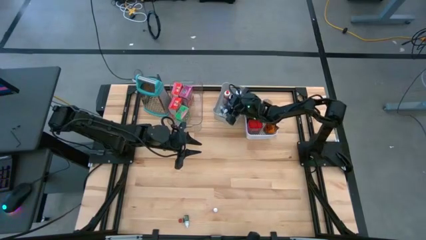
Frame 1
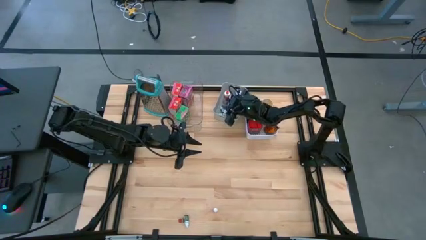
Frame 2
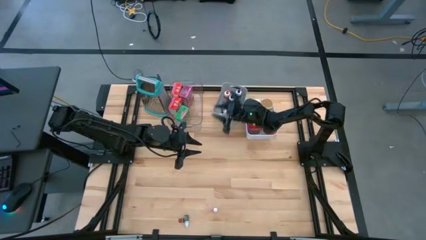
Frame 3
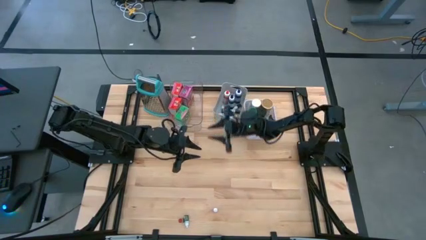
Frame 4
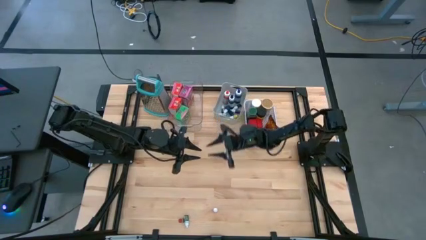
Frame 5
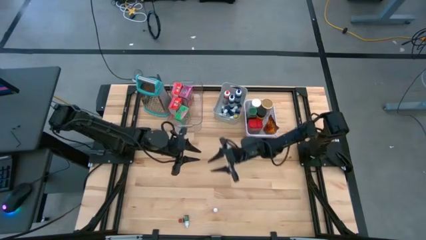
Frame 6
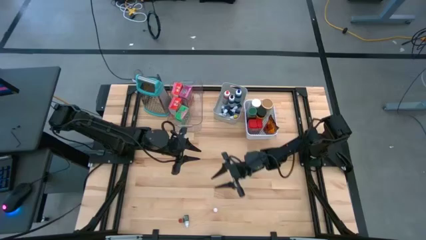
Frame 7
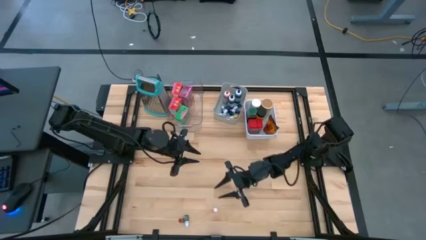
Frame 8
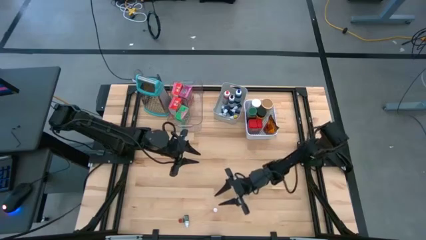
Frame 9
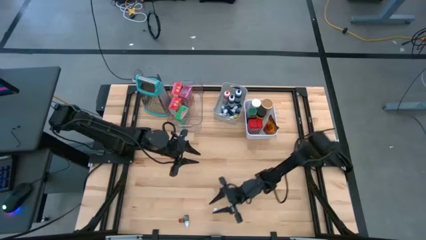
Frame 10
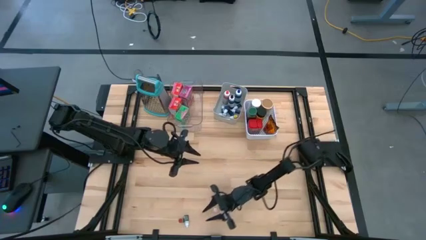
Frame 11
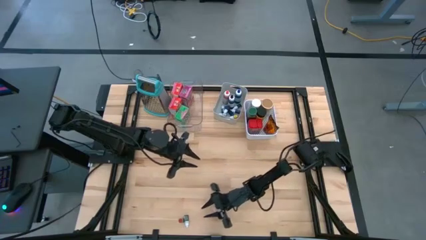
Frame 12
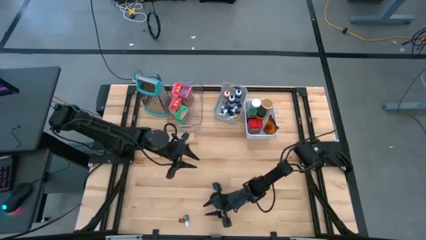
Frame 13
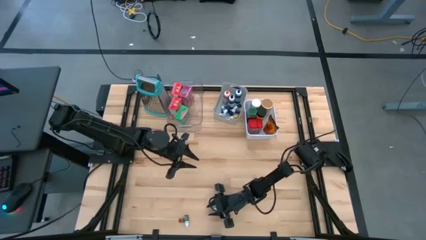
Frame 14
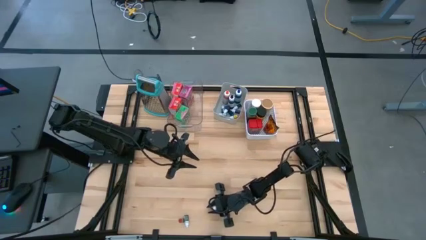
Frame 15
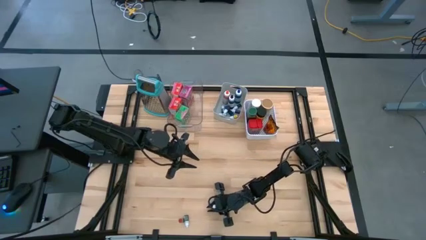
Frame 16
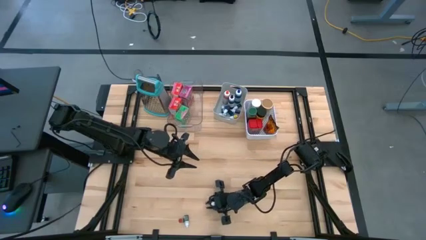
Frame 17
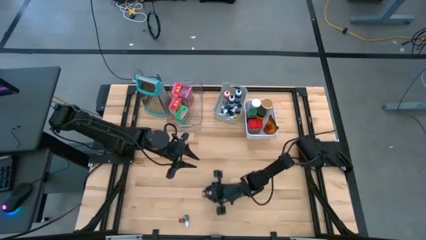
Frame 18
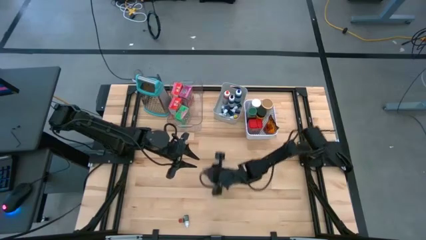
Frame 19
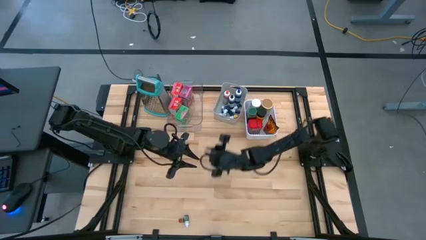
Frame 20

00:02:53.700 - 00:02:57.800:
Task: Pick & Place Kitchen Items
Put the small orange food coloring bottle into the gray bin

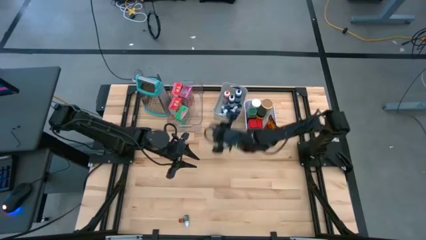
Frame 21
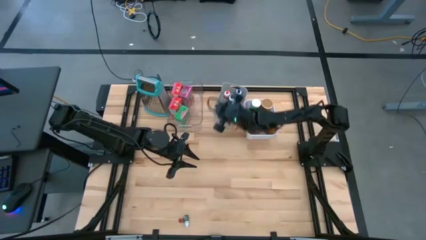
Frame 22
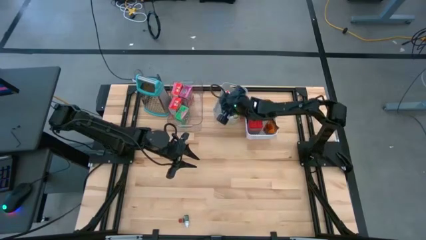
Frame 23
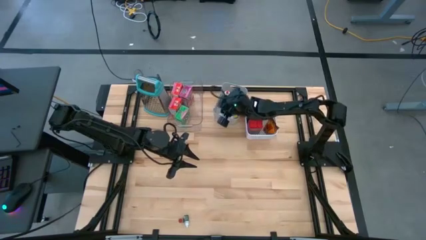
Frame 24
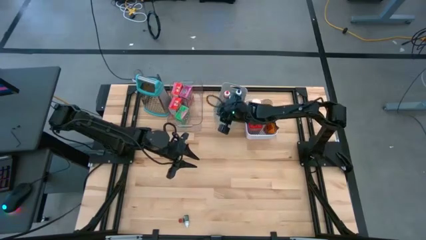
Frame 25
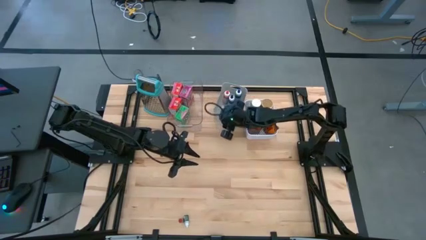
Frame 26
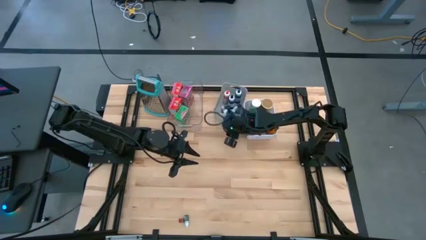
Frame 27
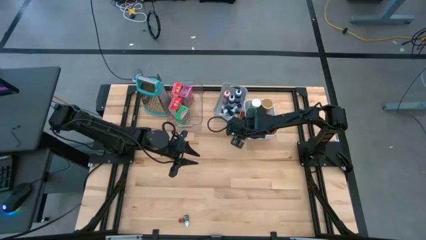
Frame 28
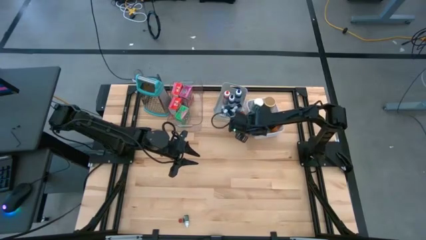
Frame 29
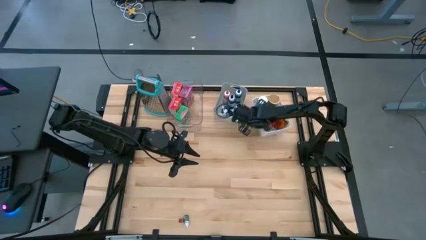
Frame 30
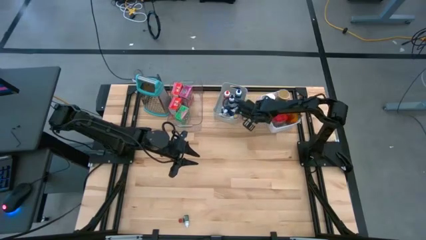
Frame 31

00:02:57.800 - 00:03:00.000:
Adjust the white bin

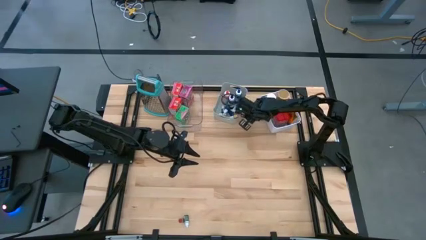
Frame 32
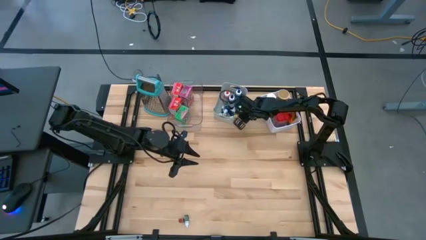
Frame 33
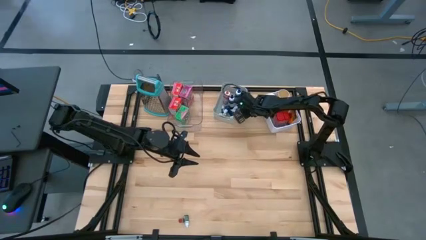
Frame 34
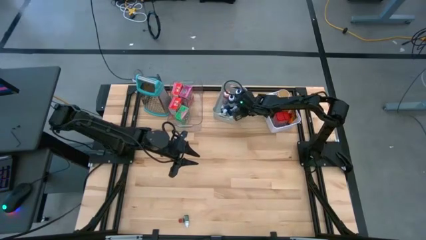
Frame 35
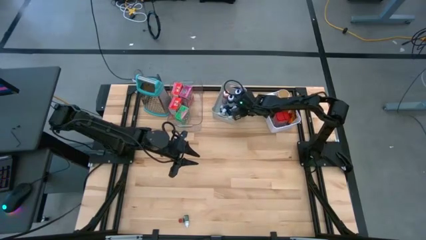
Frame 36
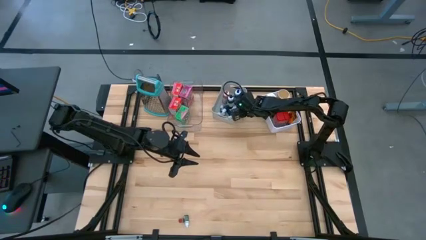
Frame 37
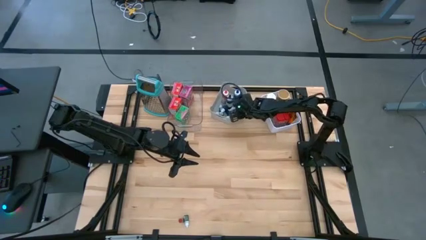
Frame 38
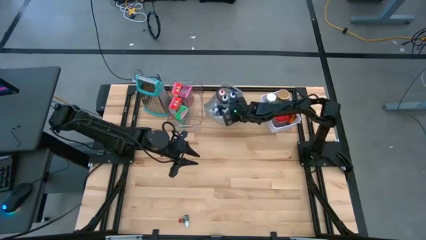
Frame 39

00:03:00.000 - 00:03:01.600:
Adjust the gray bin

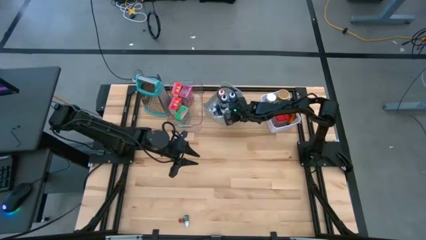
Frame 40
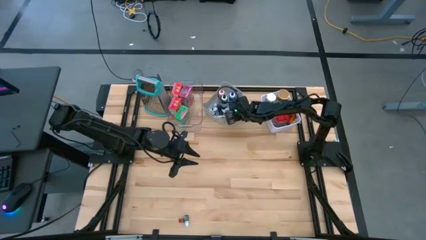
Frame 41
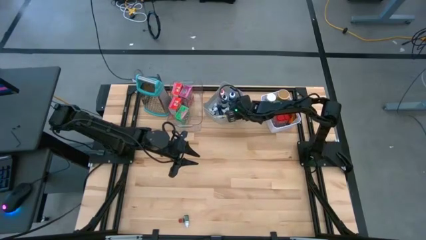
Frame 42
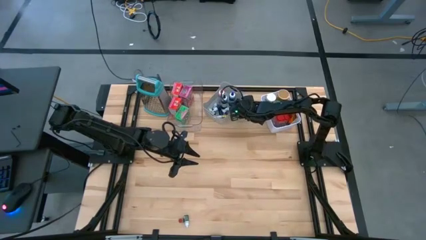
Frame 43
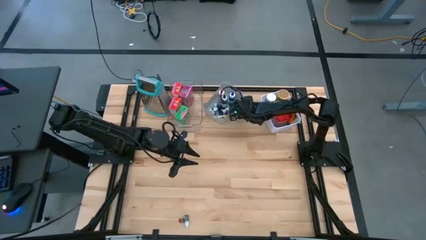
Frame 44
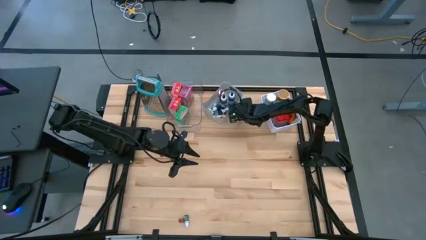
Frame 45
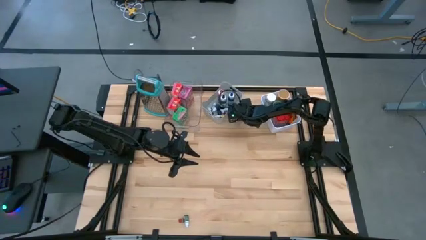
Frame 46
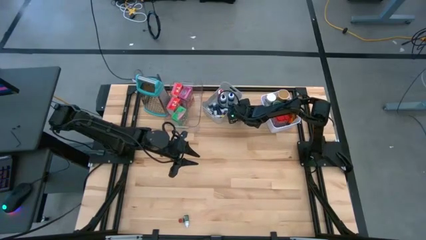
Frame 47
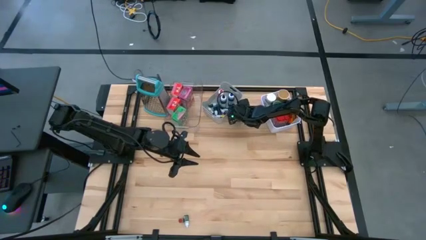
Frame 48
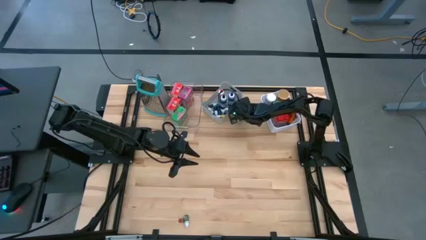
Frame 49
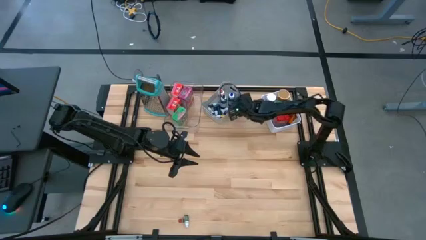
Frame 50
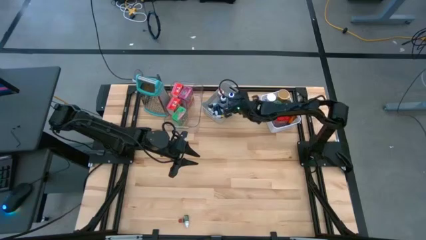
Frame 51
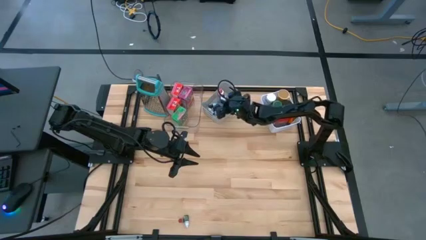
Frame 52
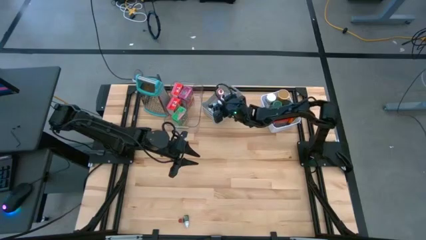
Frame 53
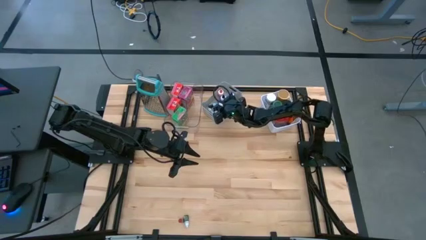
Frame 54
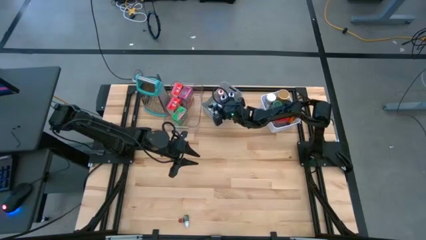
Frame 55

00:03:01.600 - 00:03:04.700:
Put the small orange food coloring bottle into the gray bin

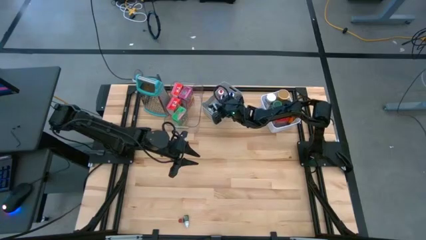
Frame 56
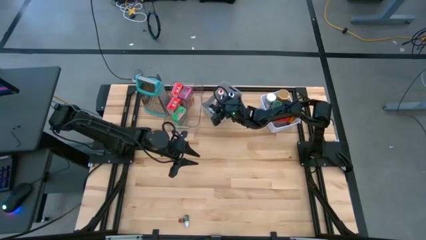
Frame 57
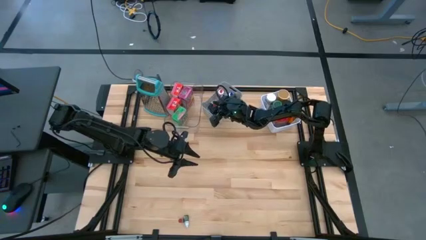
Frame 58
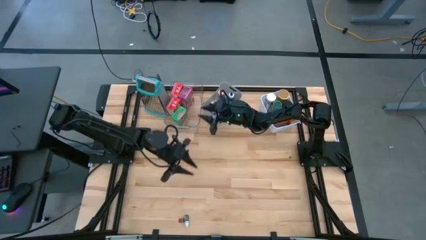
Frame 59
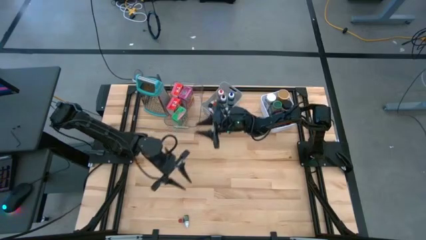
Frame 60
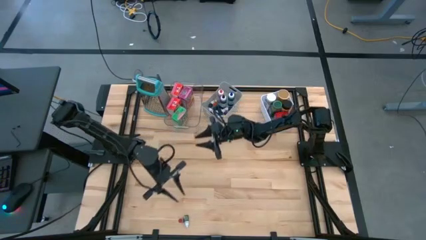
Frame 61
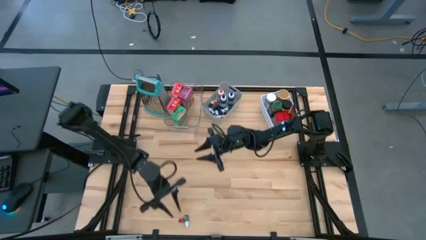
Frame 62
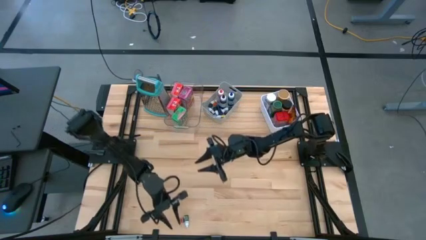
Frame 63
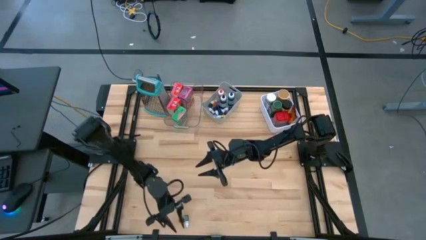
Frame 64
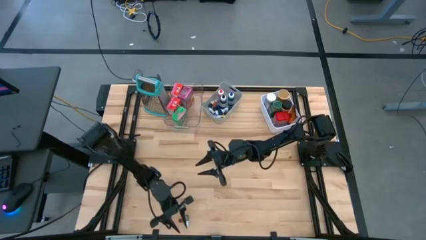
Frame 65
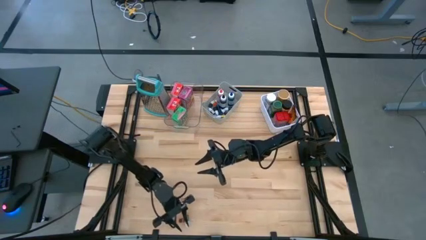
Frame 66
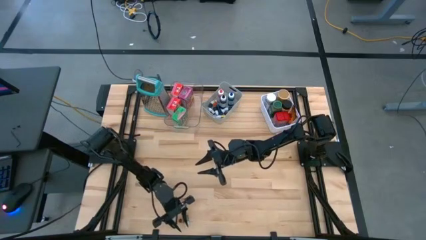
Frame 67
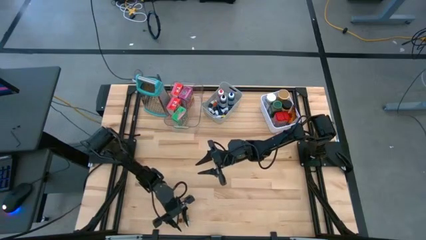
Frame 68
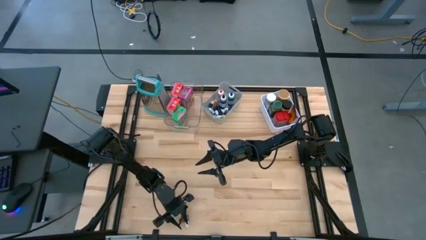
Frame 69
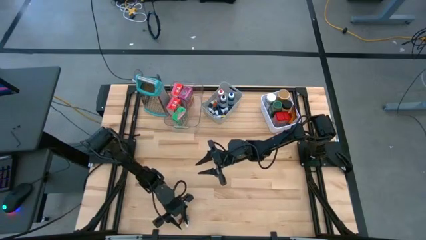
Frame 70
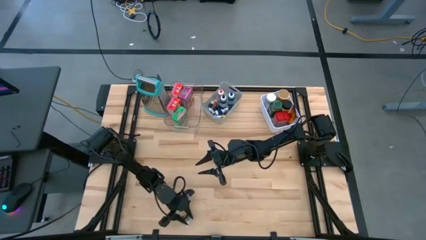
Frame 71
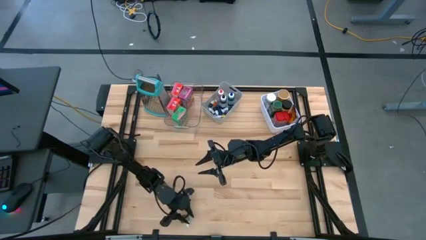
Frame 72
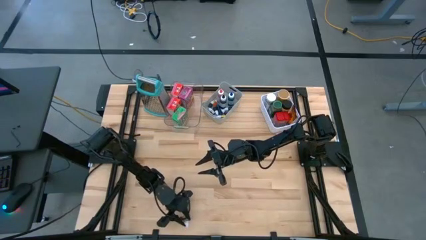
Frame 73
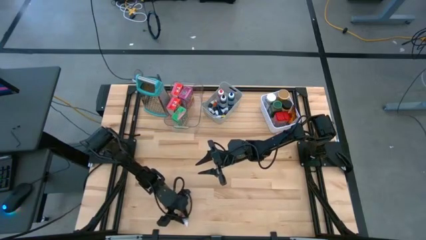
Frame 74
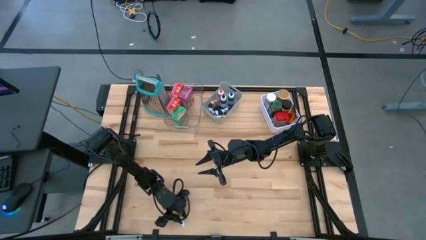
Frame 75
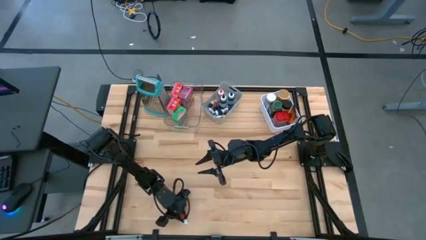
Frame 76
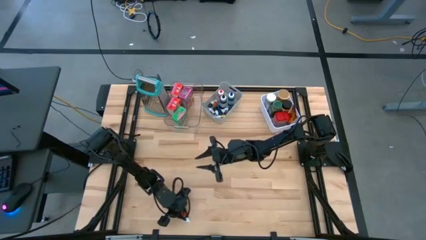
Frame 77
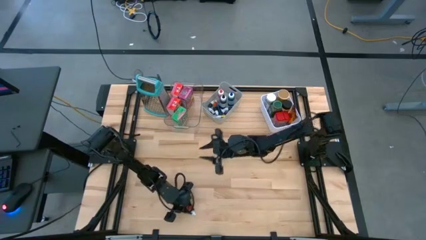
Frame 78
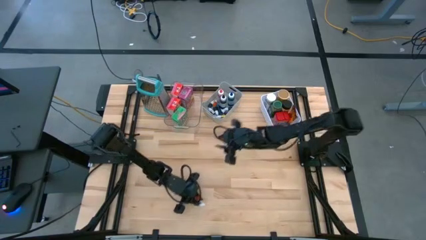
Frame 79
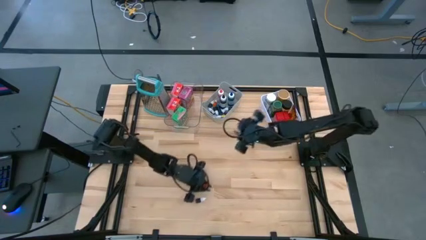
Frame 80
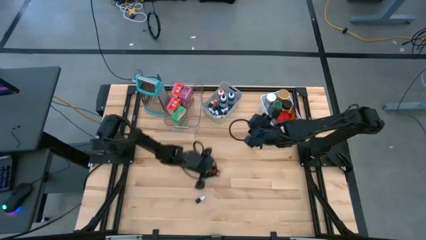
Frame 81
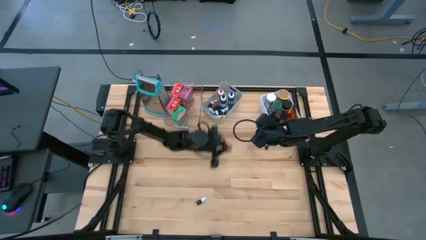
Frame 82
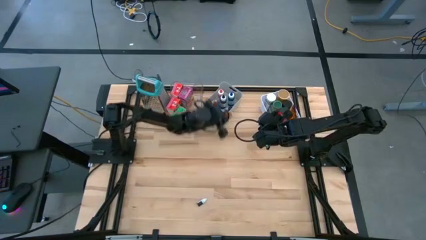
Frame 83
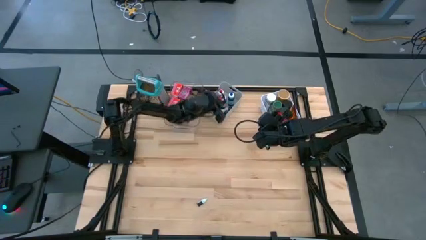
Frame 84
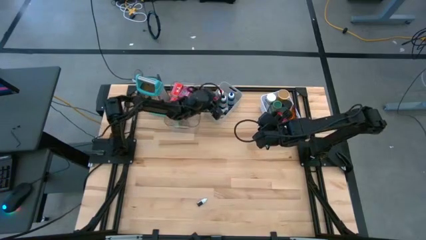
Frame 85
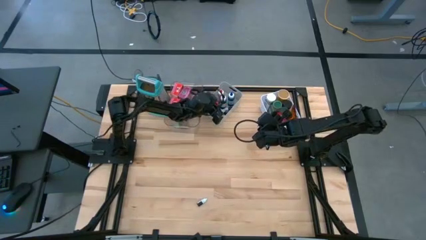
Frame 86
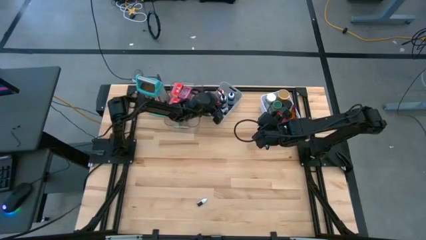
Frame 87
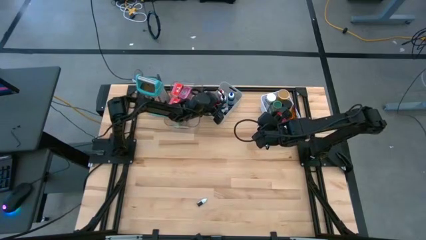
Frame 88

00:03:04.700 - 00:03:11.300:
Put the medium red food coloring bottle into the gray bin

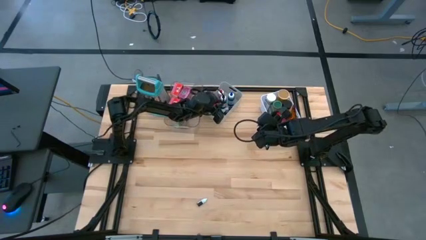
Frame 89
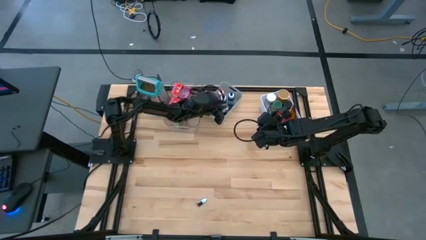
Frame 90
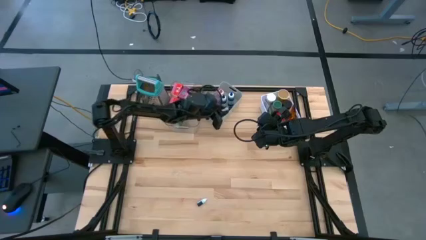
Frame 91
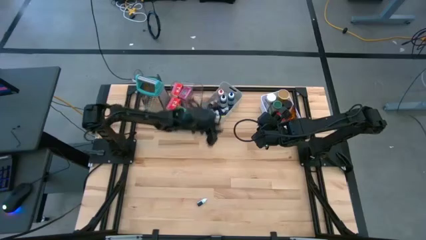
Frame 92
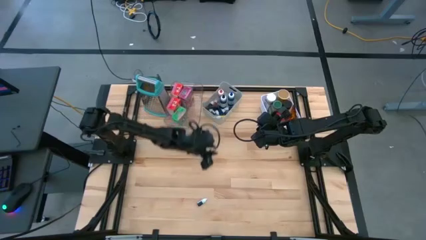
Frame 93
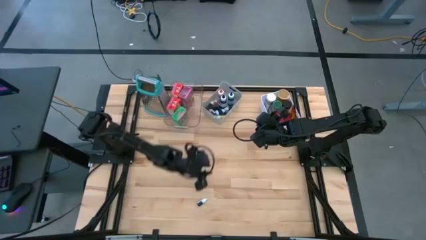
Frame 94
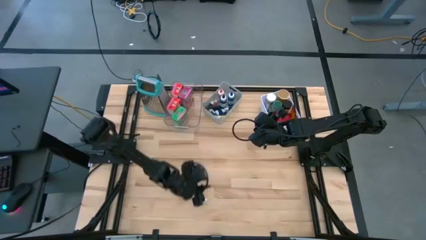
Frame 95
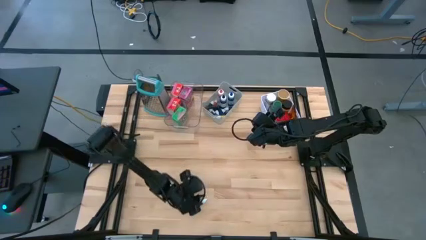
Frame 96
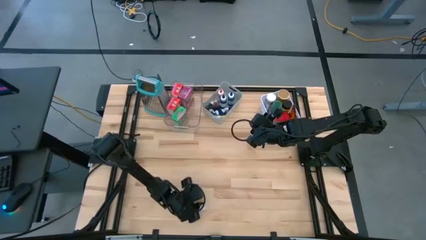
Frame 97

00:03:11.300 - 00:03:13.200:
Put the small green food coloring bottle into the gray bin
